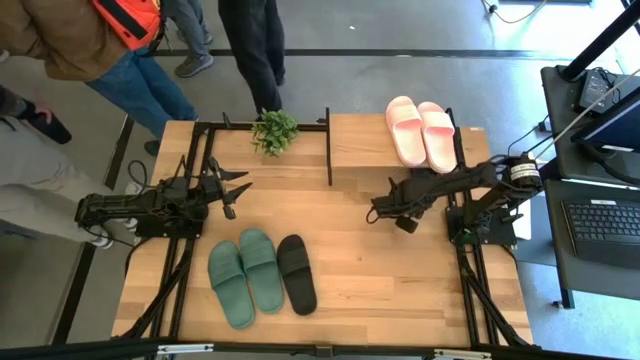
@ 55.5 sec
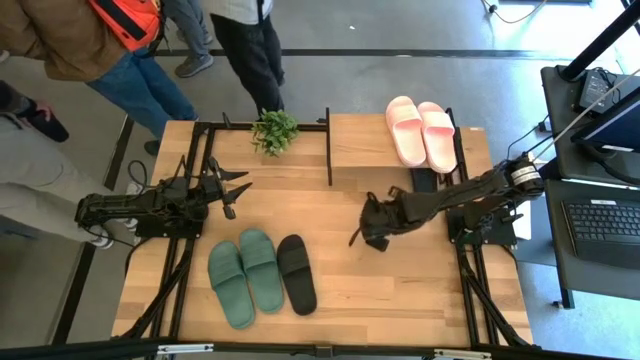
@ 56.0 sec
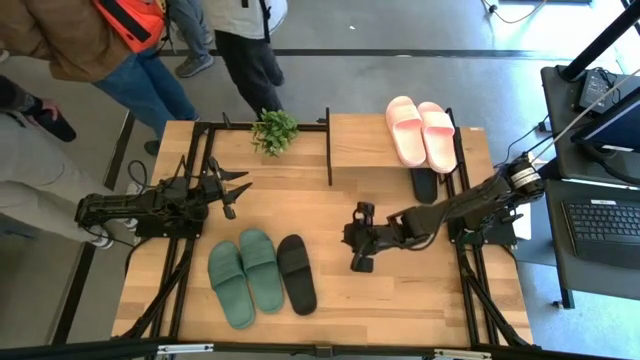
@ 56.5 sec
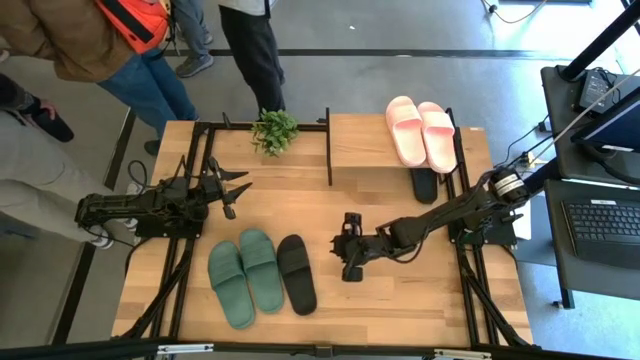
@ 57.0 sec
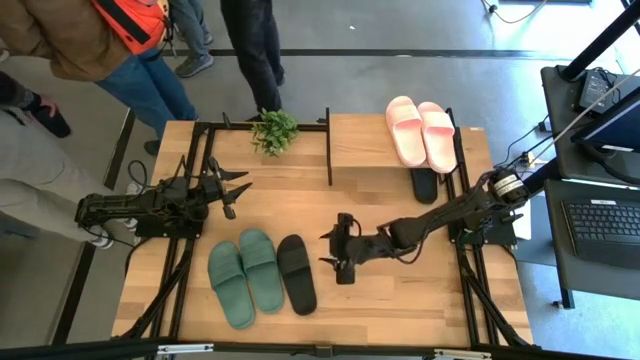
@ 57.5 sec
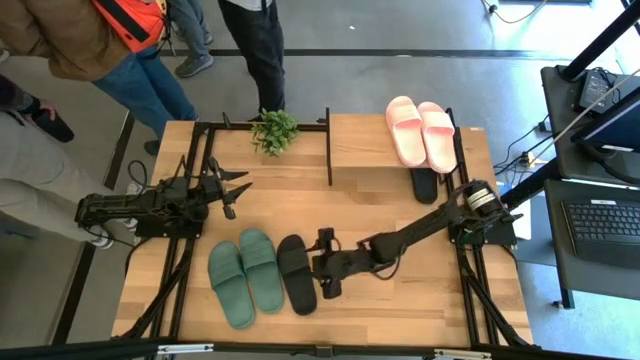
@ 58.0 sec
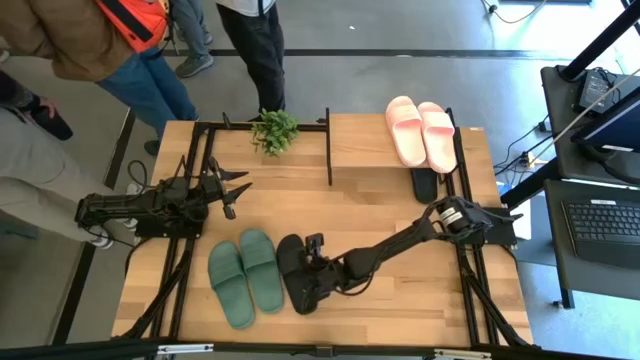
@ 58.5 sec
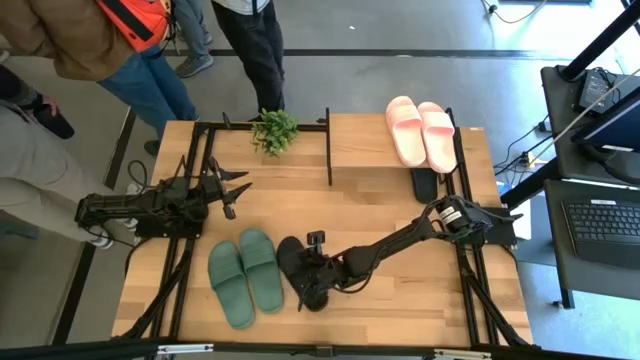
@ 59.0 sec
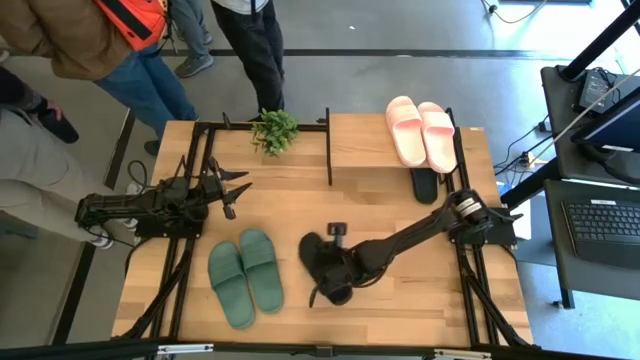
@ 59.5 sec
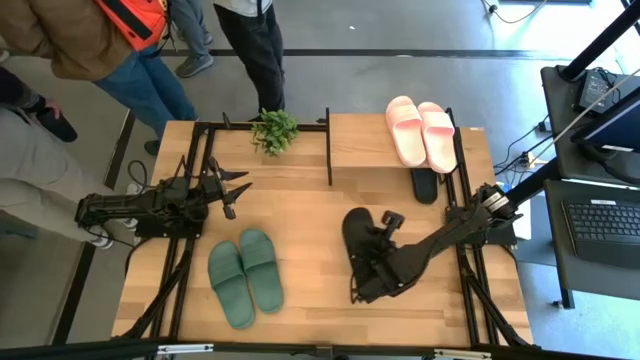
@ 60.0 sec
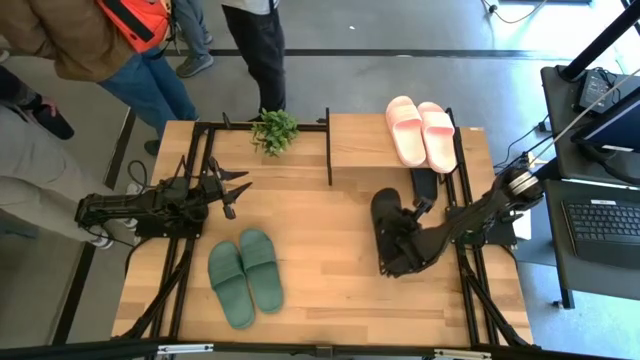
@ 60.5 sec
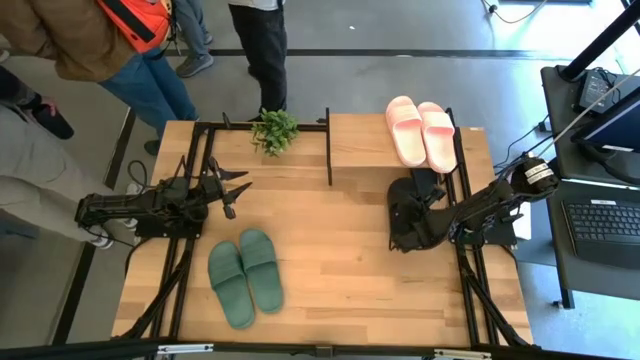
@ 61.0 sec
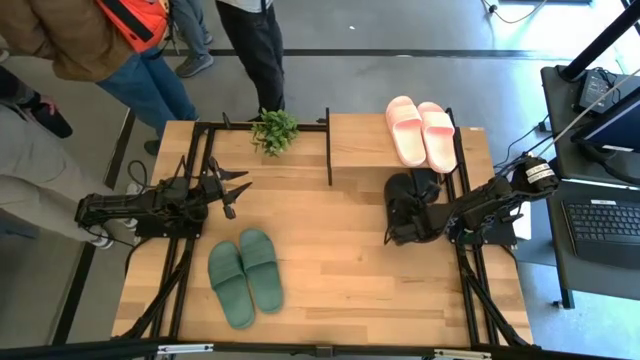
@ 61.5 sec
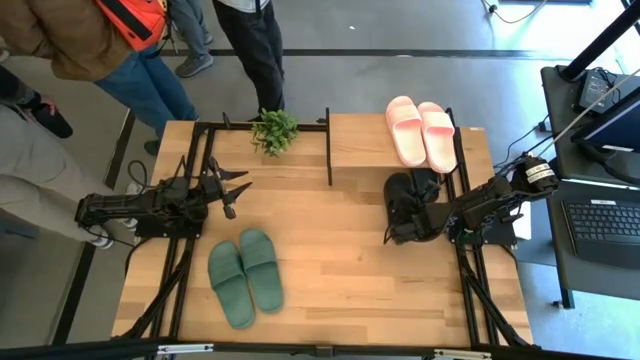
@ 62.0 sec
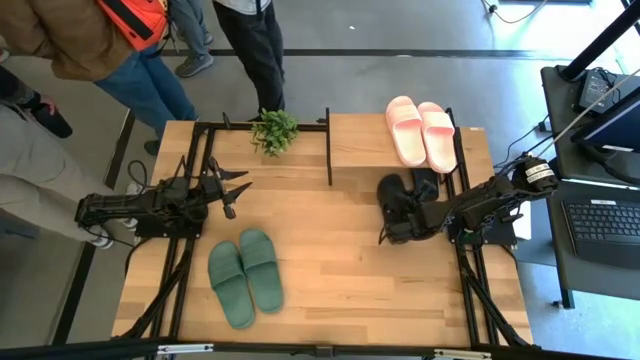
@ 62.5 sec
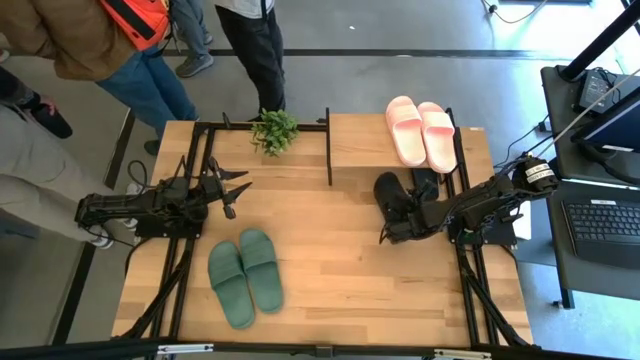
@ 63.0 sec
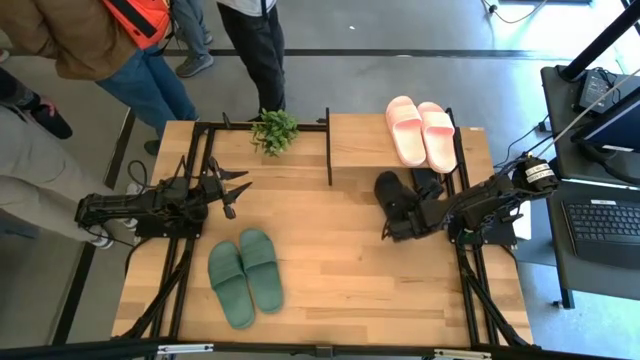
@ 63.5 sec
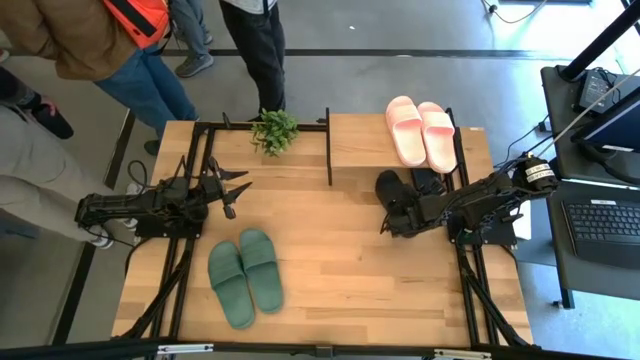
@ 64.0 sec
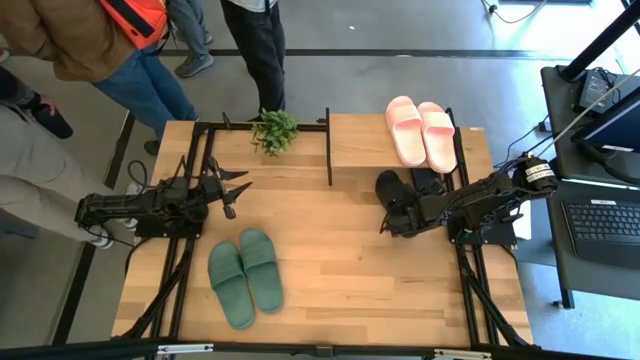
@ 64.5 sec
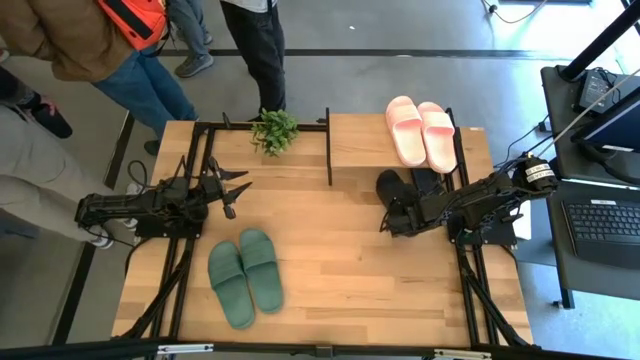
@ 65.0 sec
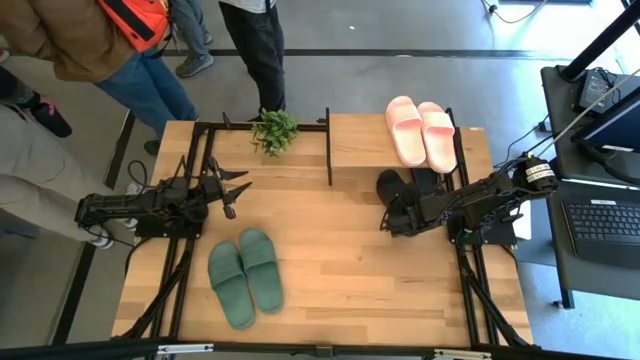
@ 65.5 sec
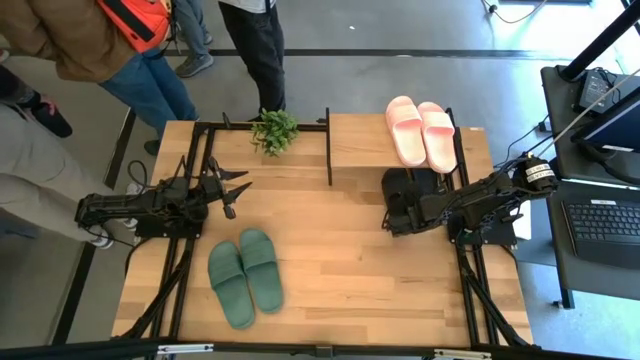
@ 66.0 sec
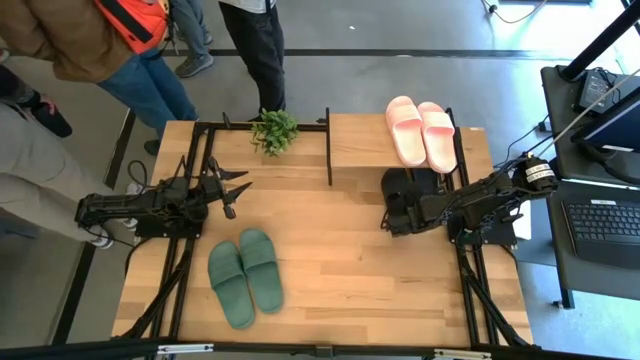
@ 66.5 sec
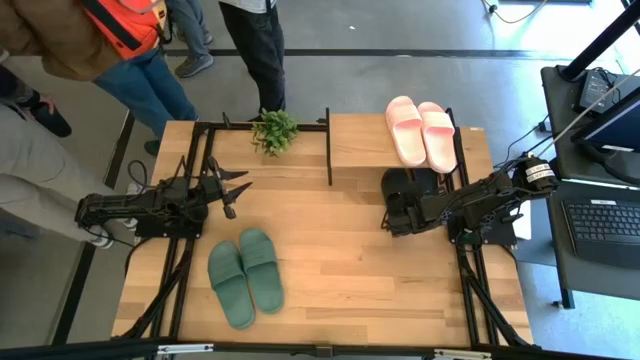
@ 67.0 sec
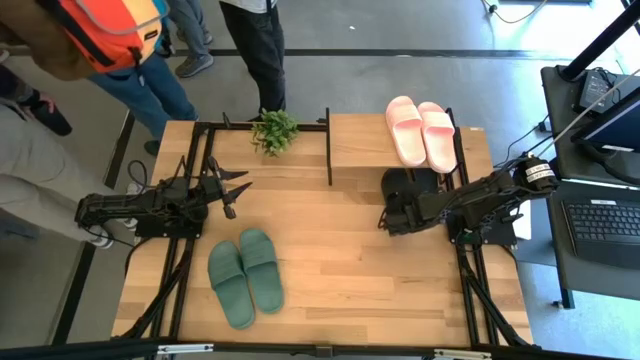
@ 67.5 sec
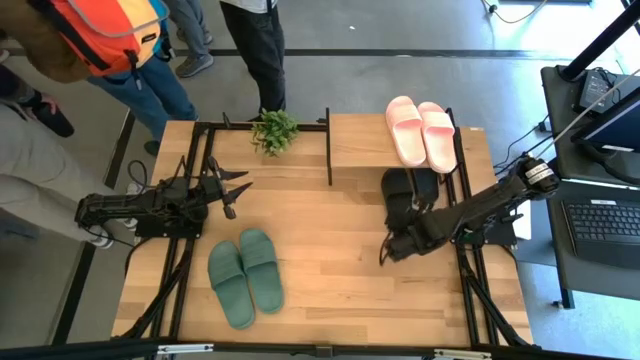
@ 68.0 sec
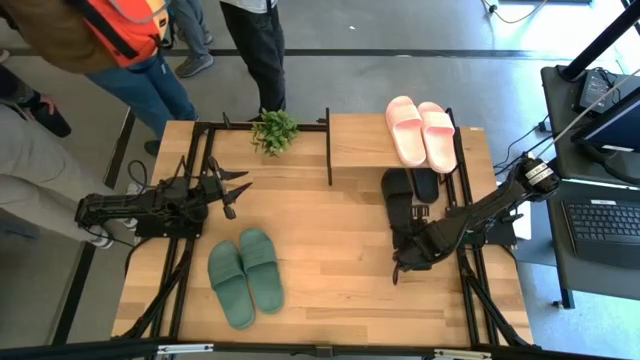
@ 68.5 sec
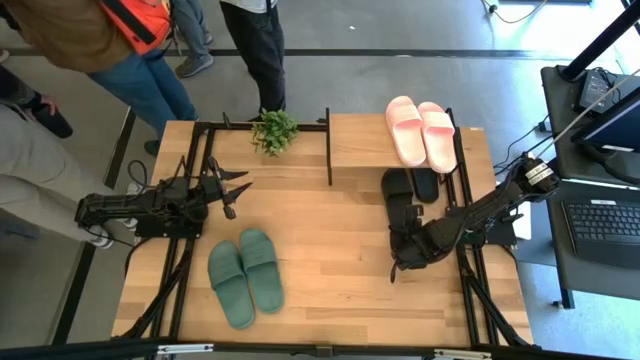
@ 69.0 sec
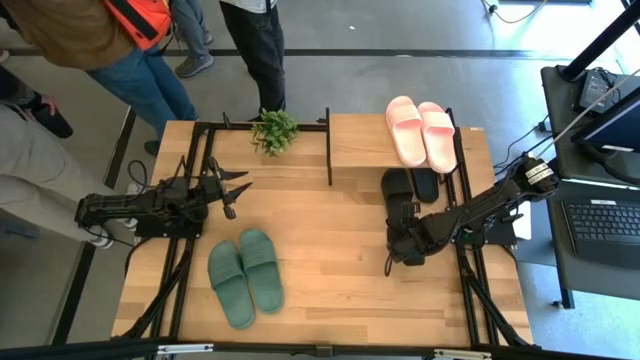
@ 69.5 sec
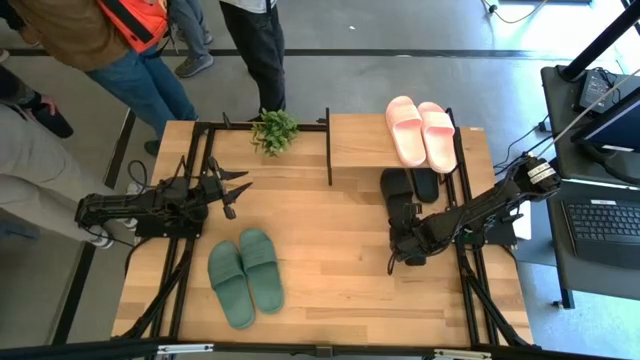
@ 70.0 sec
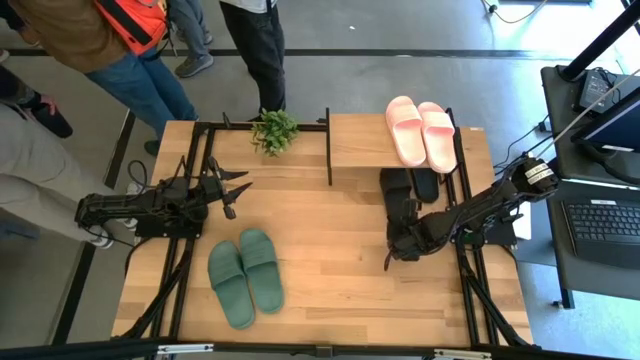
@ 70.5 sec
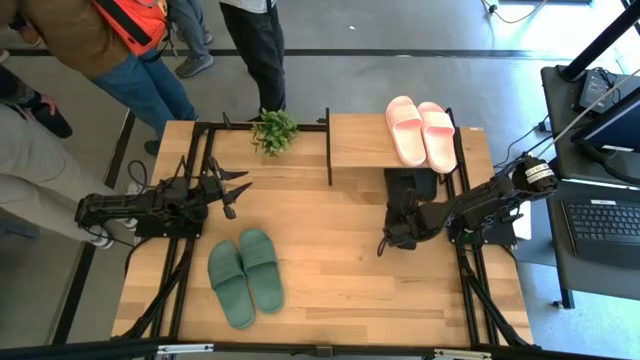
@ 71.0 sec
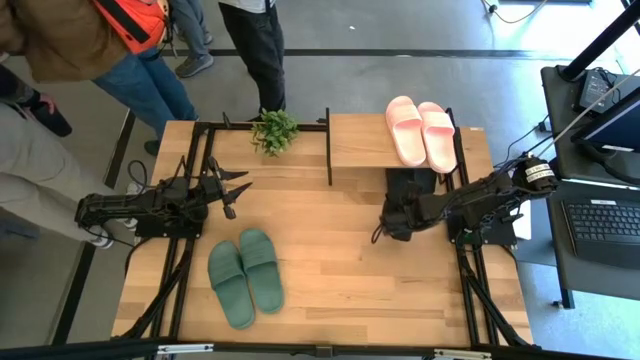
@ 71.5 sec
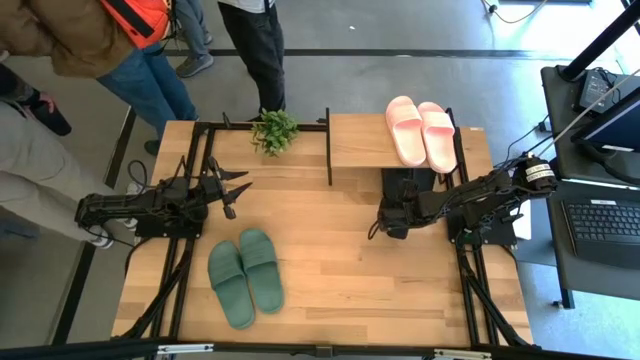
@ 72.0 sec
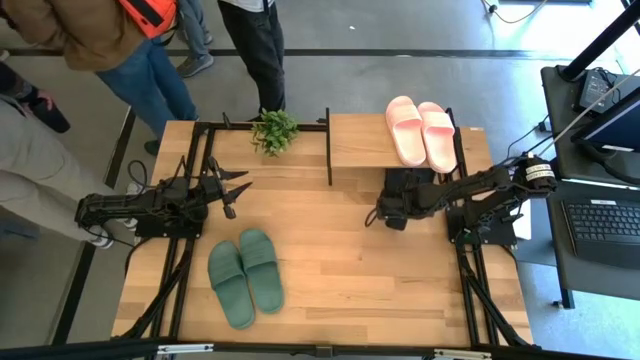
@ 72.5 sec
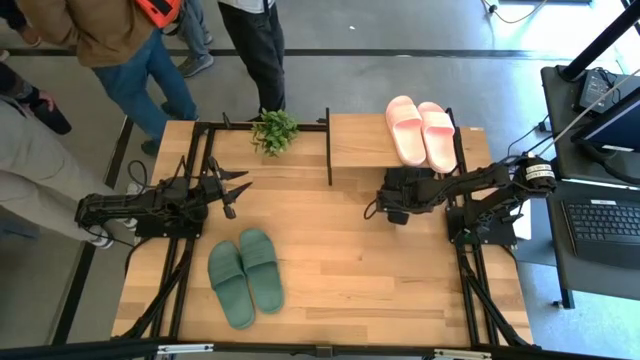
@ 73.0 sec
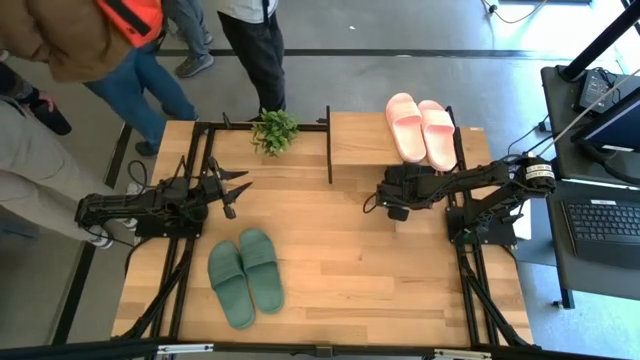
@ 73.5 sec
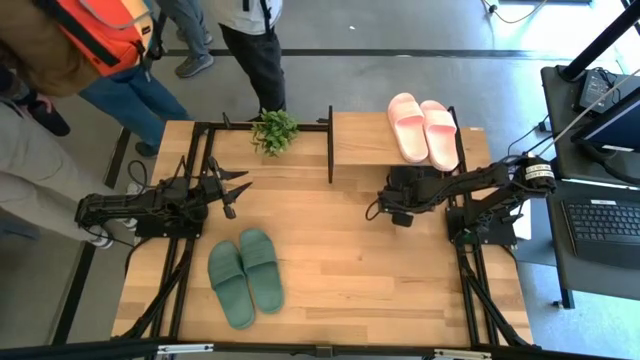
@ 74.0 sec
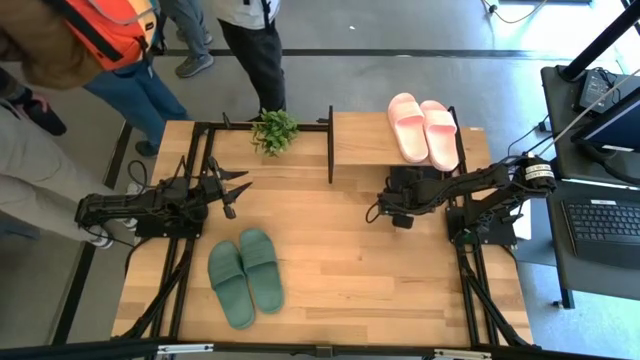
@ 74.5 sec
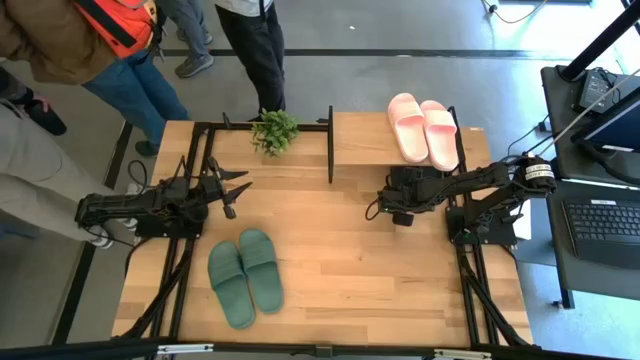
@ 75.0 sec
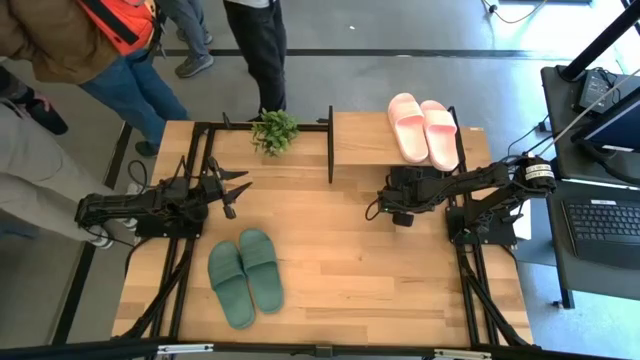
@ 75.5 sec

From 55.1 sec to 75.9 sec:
Task: Pick and place slides into the shelf
Put the black slide under the shelf
